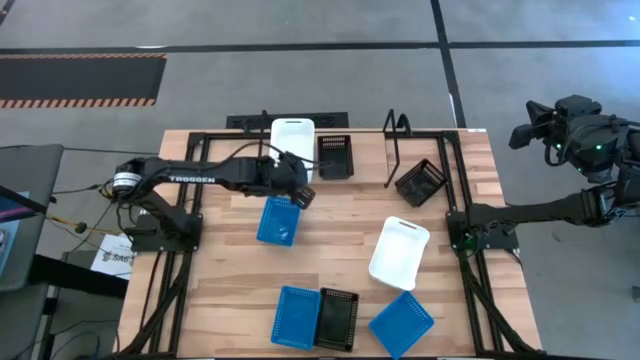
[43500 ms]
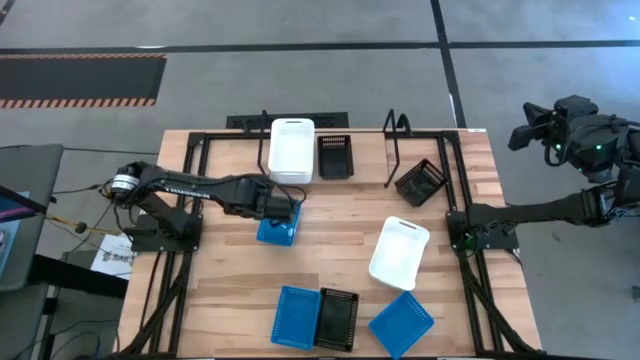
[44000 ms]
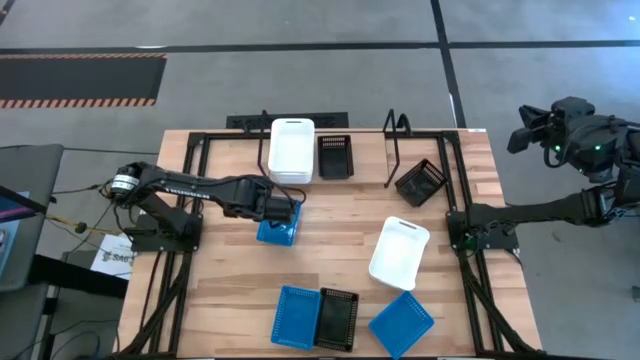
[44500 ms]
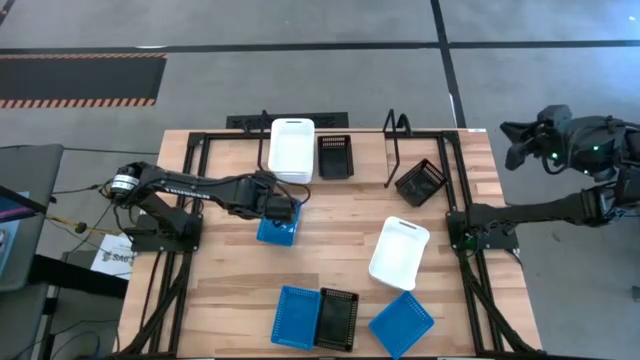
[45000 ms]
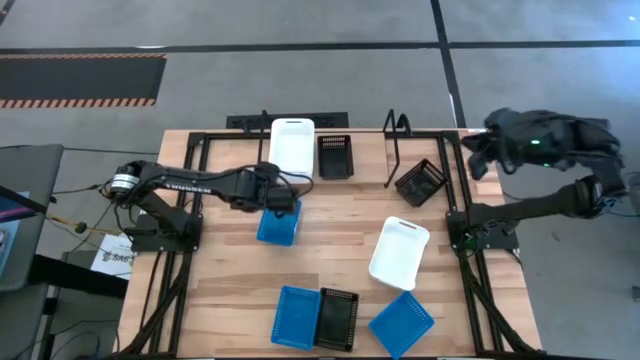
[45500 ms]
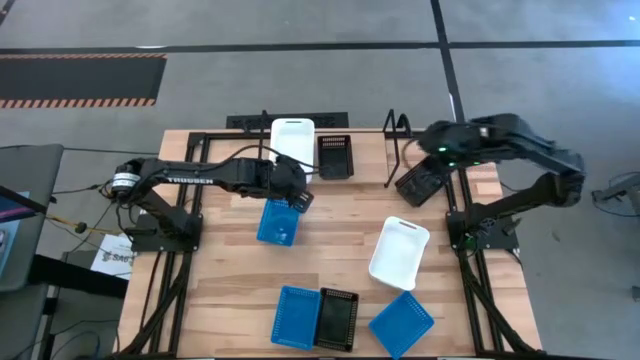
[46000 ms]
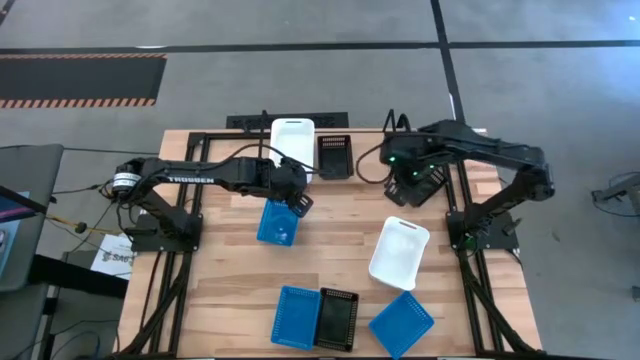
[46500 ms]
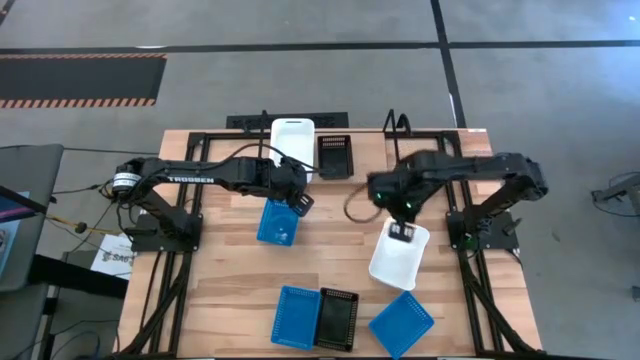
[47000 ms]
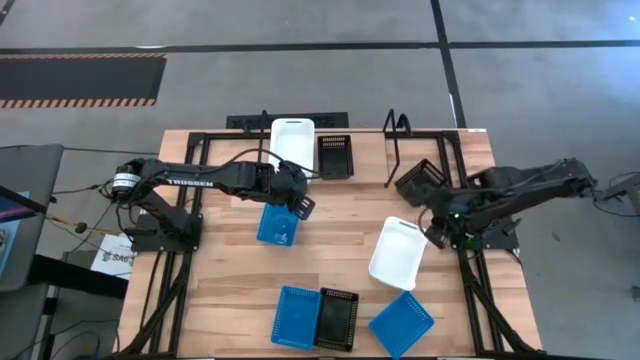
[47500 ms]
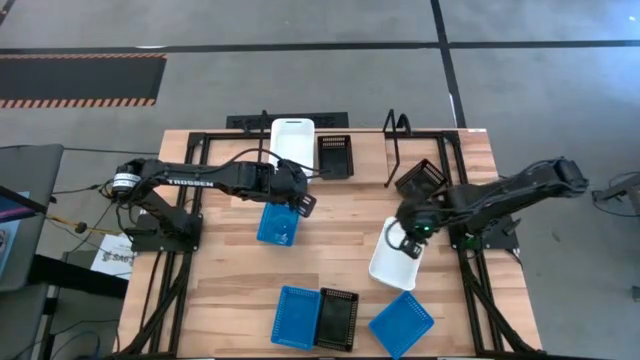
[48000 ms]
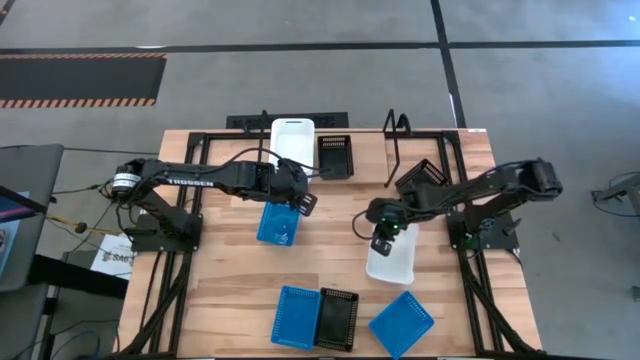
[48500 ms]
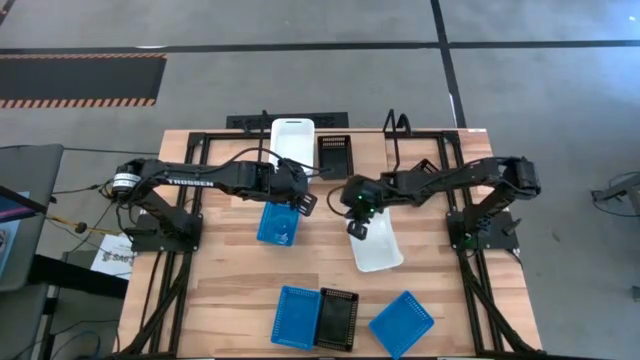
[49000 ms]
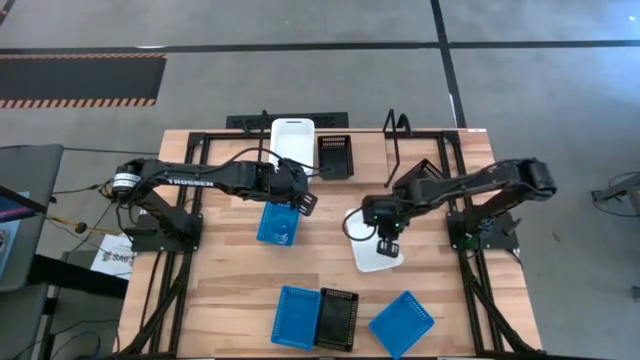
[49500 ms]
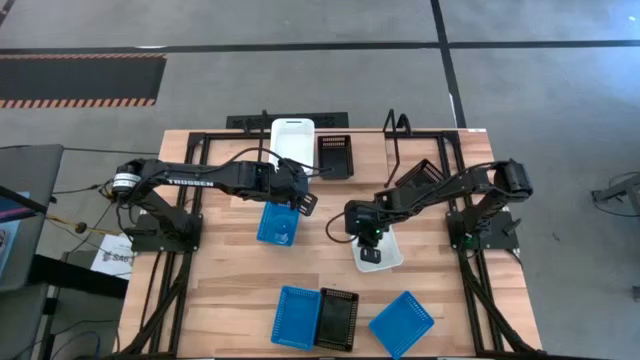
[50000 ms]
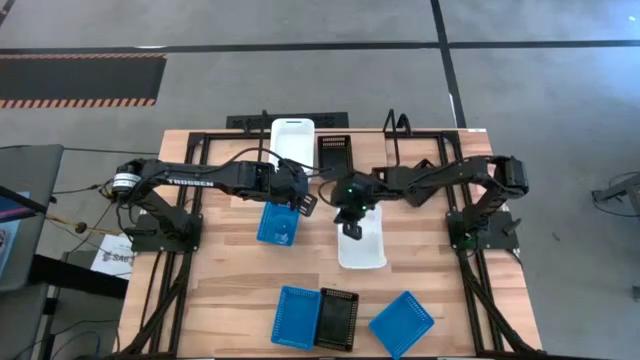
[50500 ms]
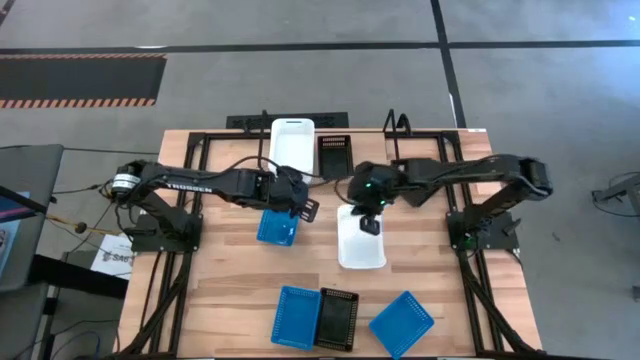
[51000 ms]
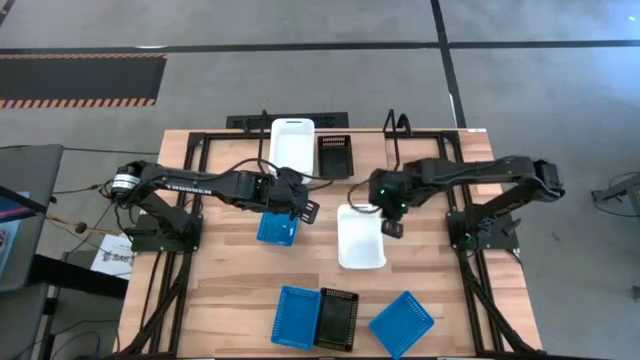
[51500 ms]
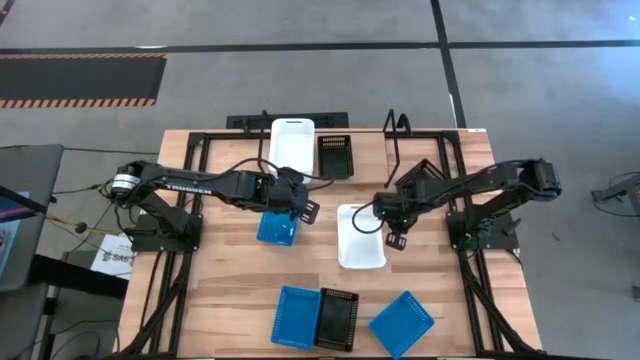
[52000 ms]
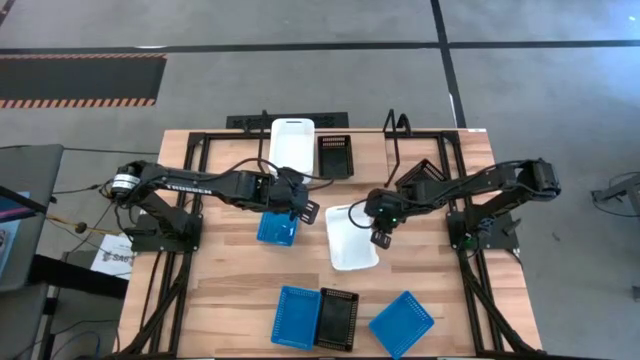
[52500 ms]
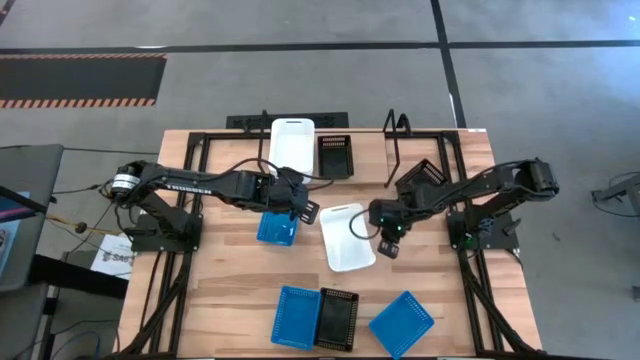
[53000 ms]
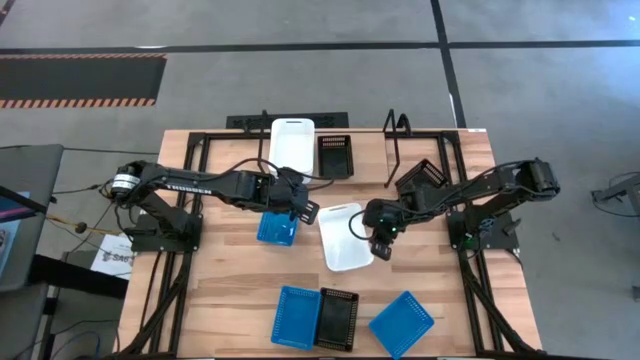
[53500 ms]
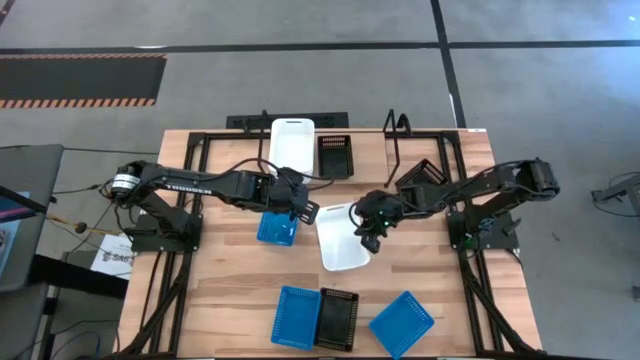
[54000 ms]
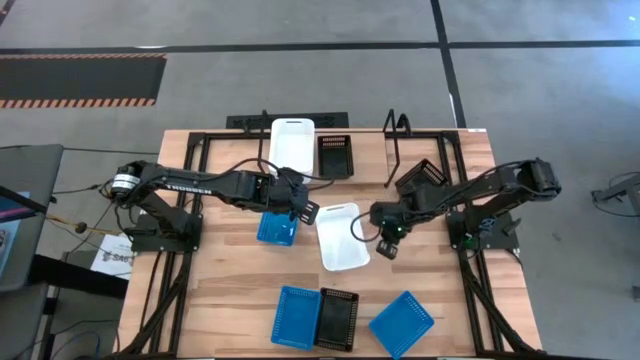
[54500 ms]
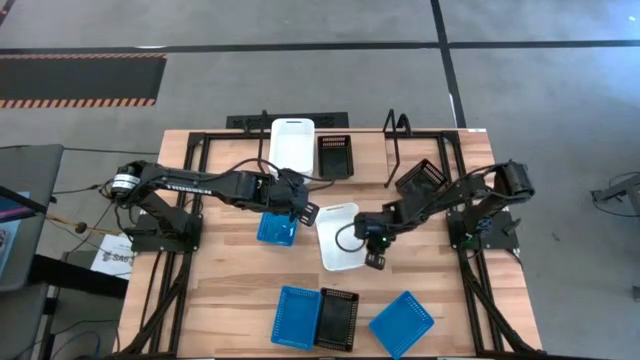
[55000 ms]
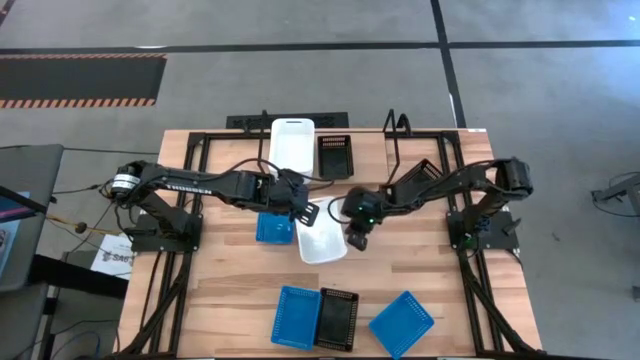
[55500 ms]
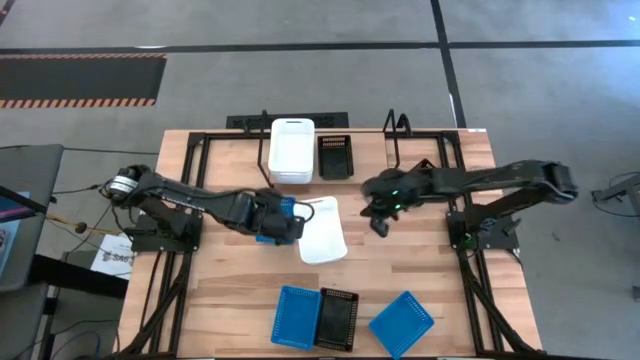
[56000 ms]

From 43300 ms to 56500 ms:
Task: Stack baskets on shelf by color
Stack the white bin on top of the white bin on the shelf

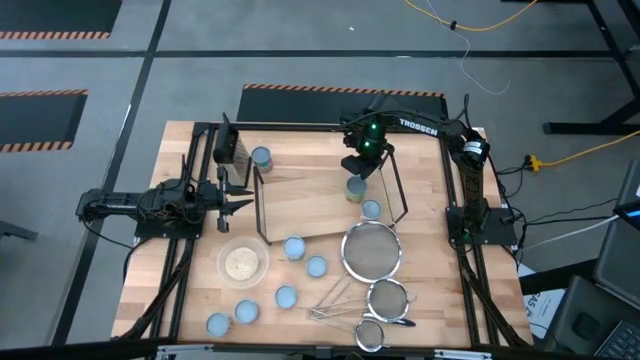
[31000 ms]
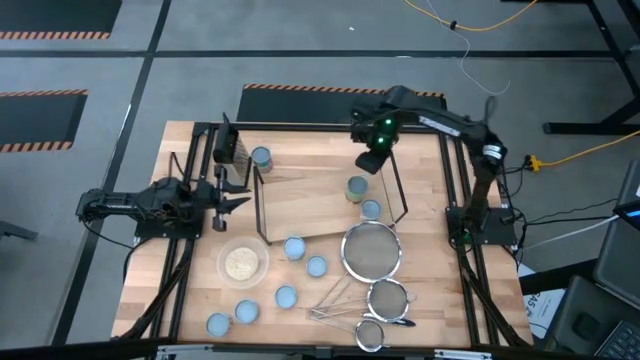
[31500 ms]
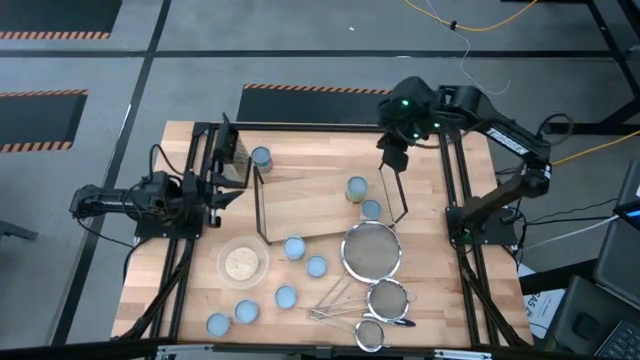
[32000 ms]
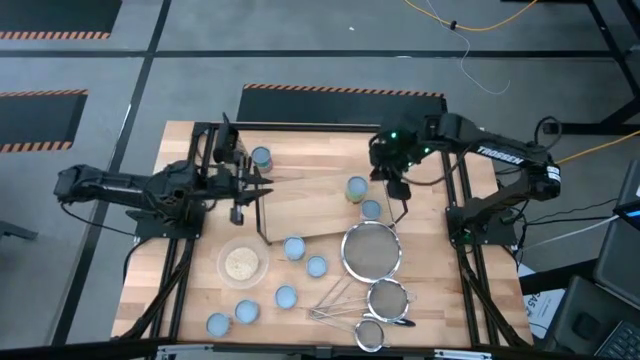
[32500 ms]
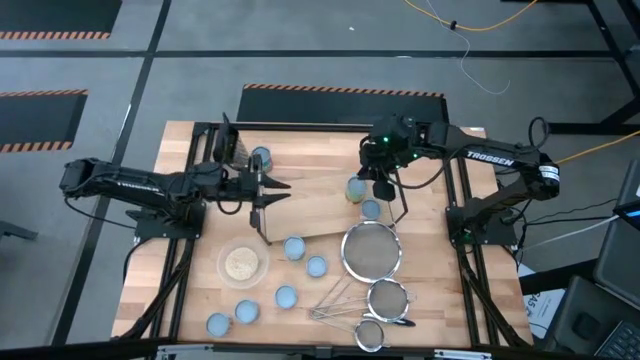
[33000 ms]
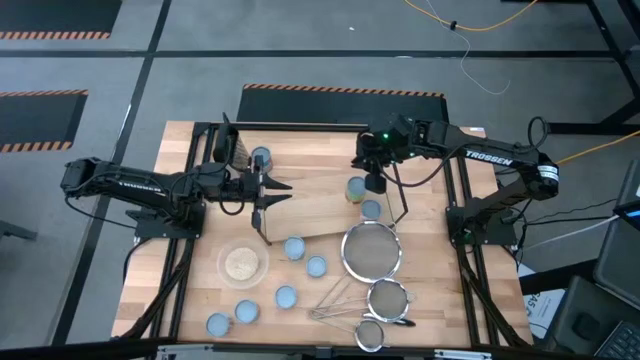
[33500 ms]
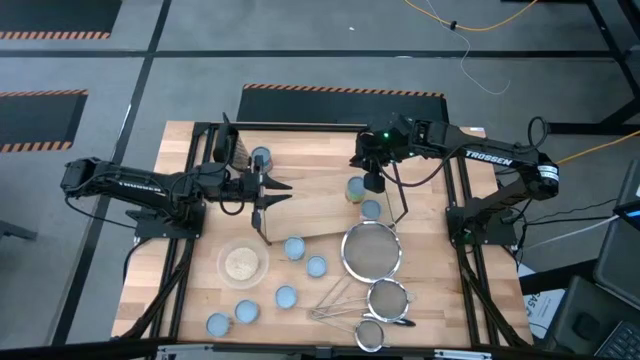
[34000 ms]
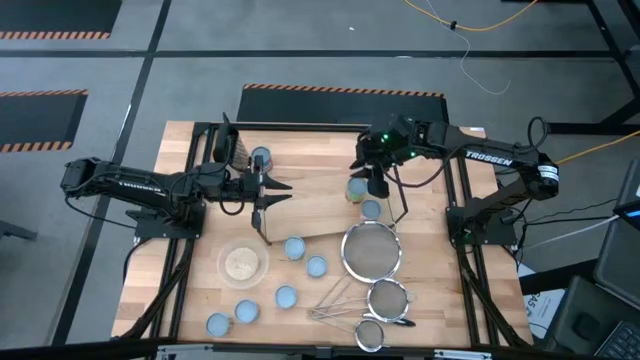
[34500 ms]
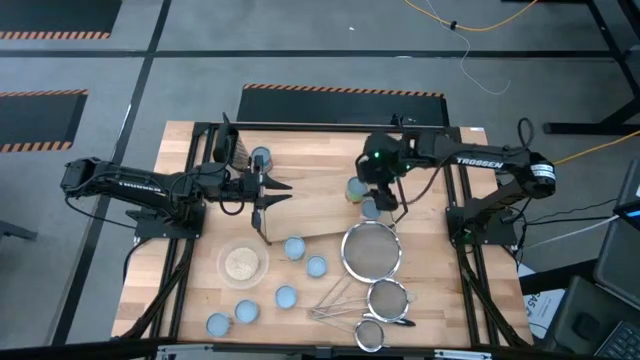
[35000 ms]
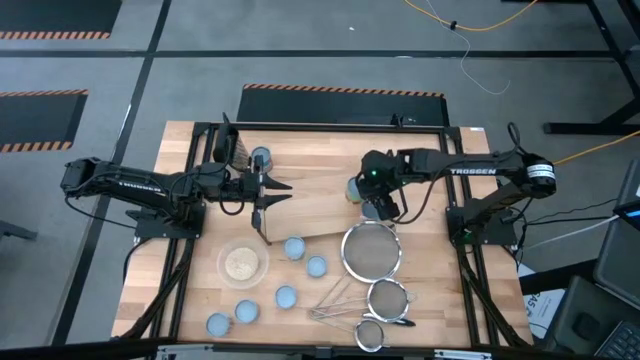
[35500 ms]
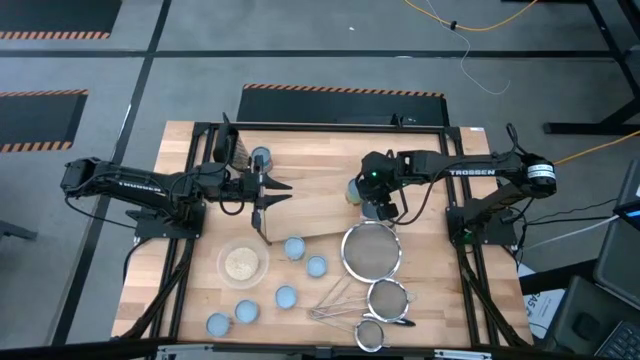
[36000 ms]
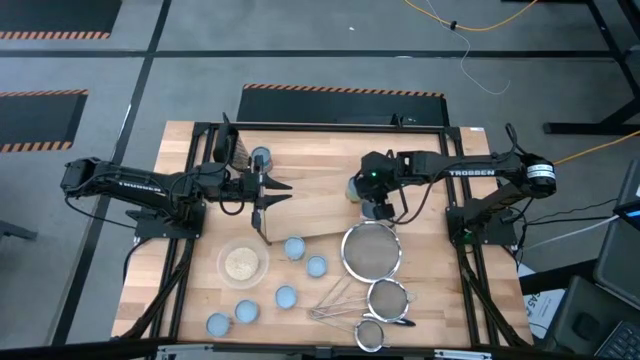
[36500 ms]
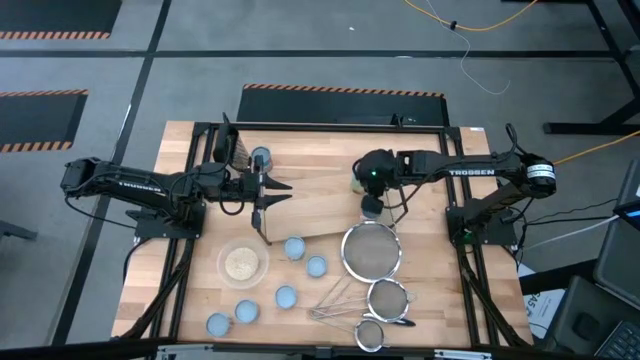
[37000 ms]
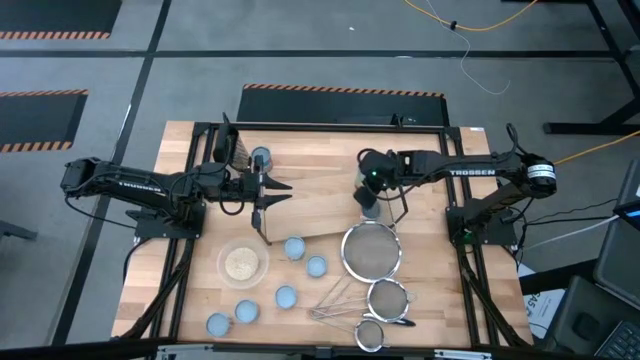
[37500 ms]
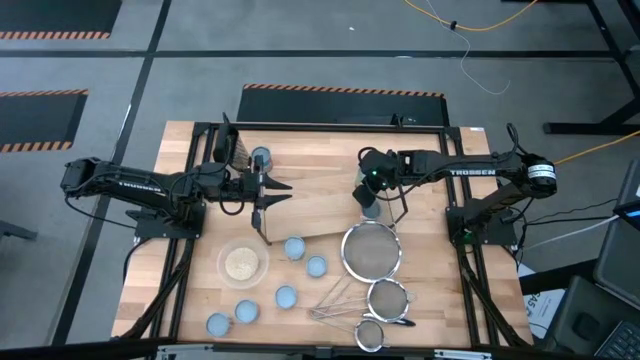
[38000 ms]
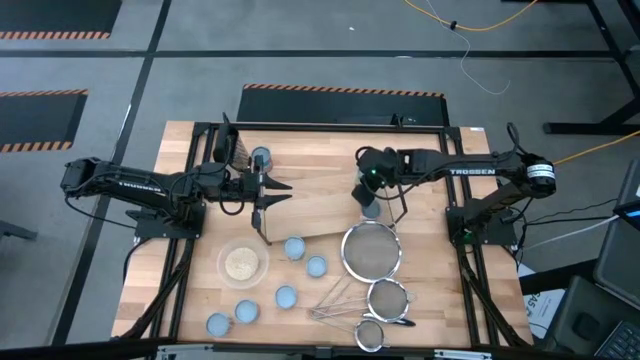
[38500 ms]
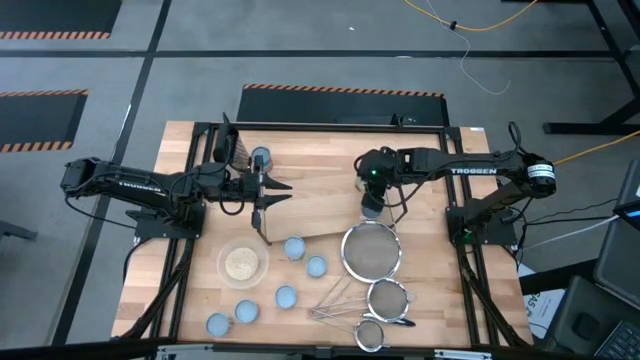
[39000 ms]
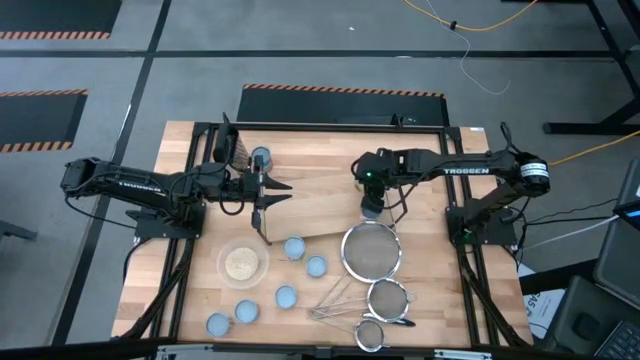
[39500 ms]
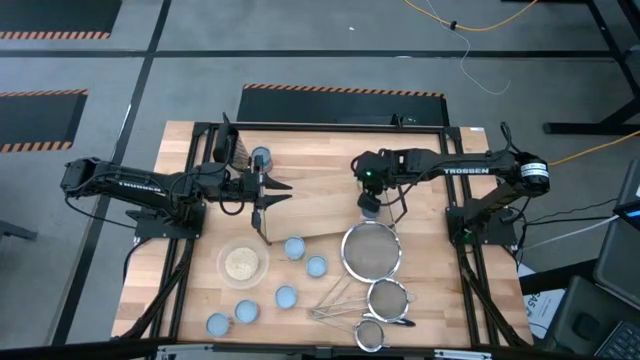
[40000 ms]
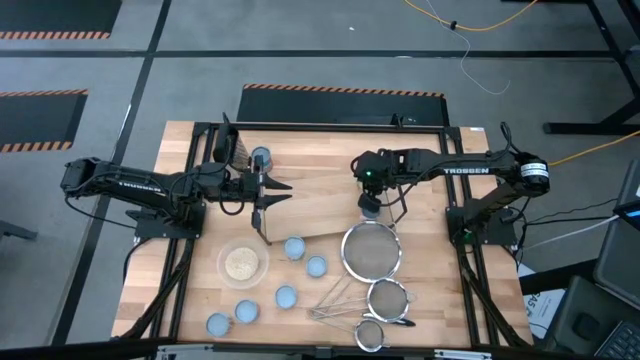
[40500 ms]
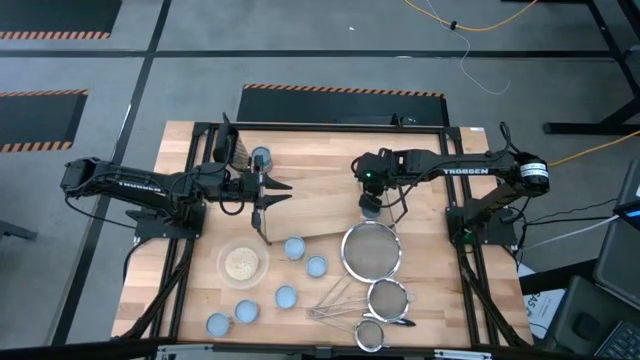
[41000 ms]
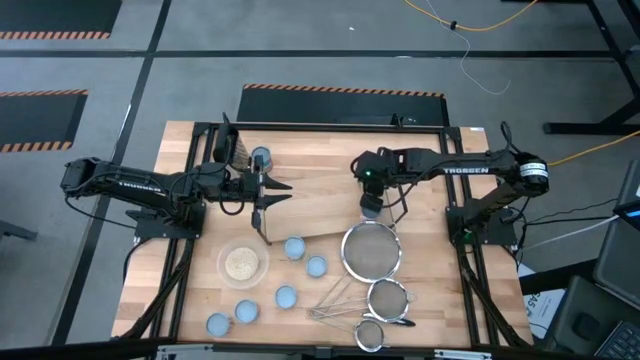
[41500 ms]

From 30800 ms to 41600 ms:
Task: Pick and place cans onto a shelf
Adjust the large yellow can on the shelf
